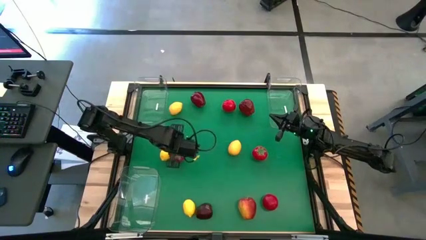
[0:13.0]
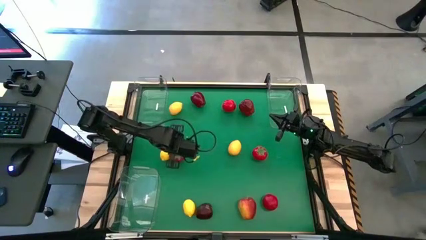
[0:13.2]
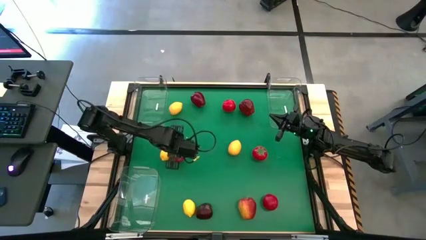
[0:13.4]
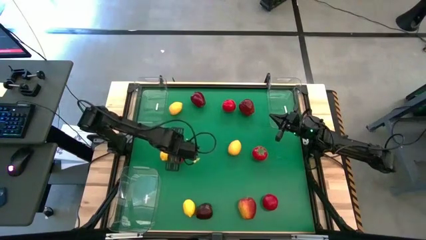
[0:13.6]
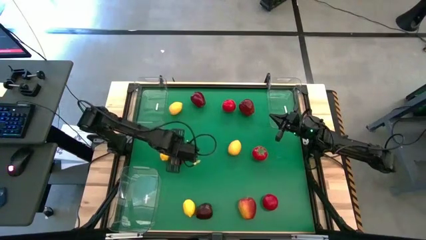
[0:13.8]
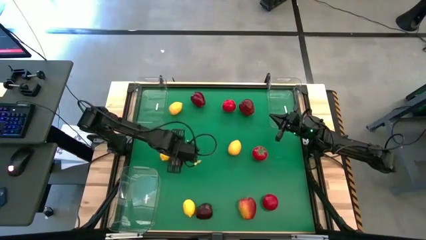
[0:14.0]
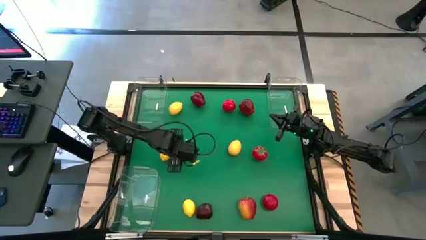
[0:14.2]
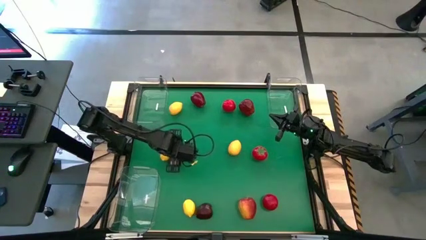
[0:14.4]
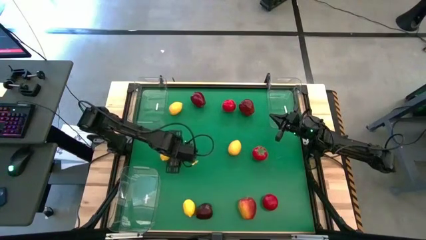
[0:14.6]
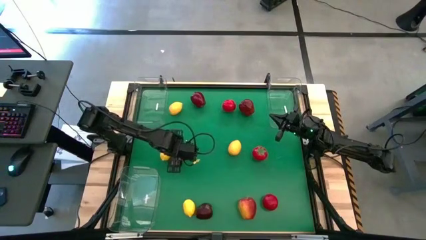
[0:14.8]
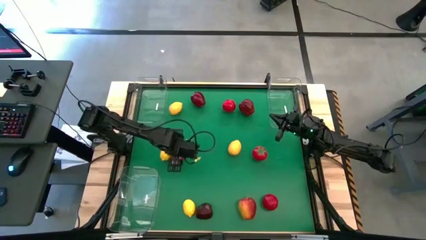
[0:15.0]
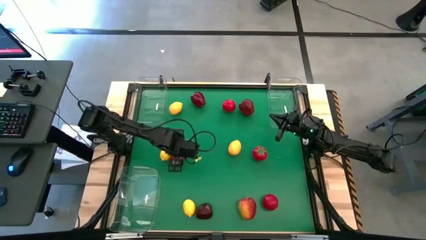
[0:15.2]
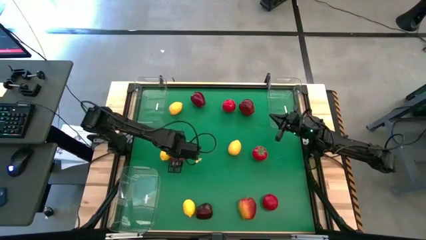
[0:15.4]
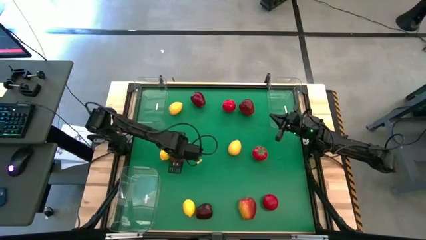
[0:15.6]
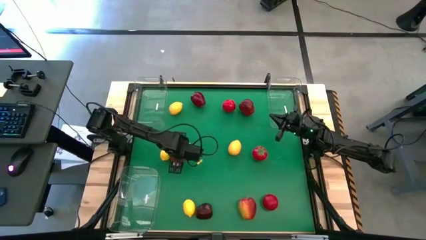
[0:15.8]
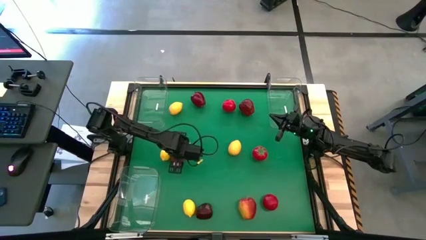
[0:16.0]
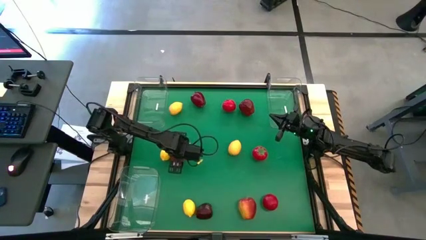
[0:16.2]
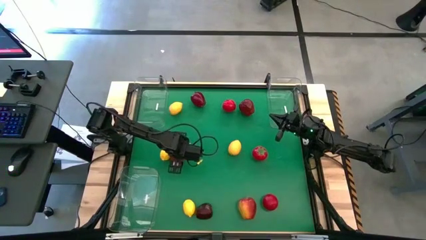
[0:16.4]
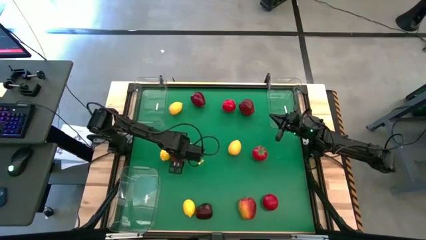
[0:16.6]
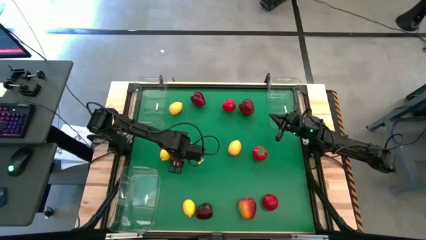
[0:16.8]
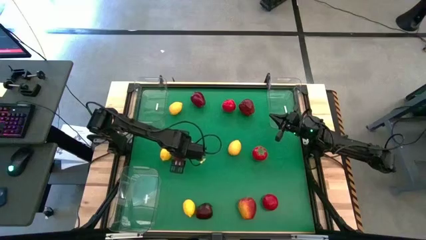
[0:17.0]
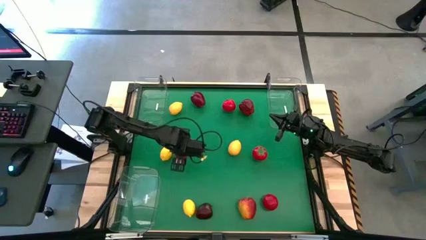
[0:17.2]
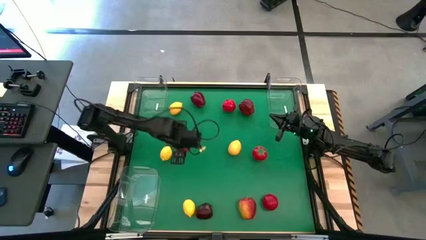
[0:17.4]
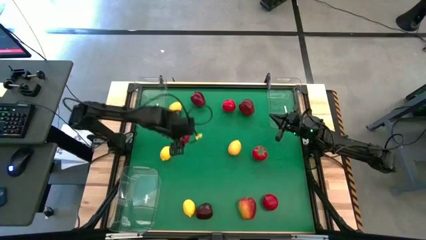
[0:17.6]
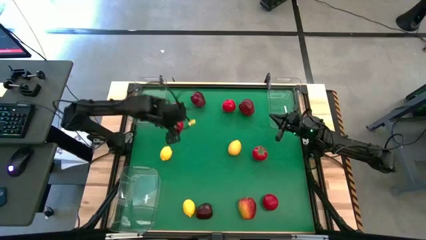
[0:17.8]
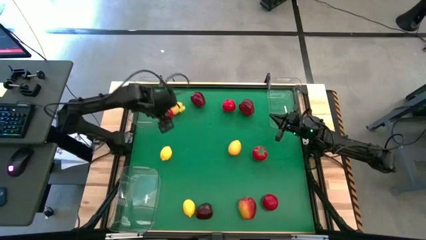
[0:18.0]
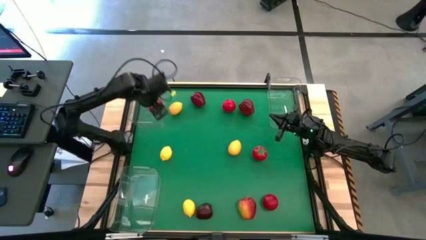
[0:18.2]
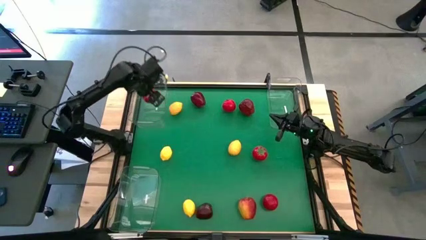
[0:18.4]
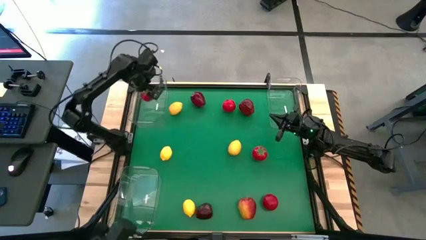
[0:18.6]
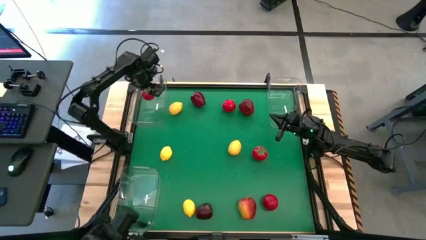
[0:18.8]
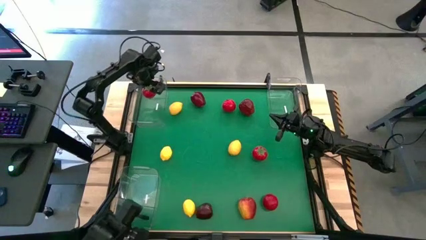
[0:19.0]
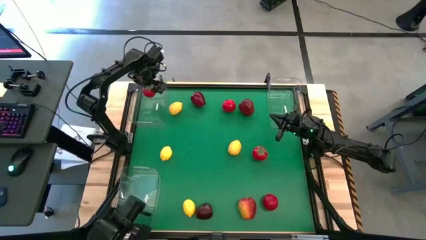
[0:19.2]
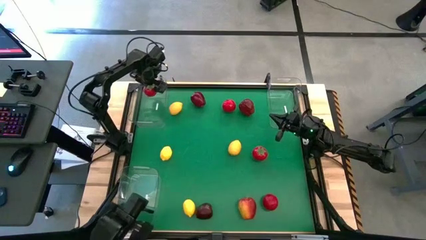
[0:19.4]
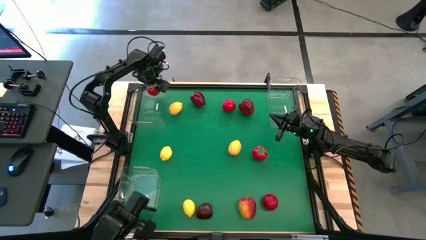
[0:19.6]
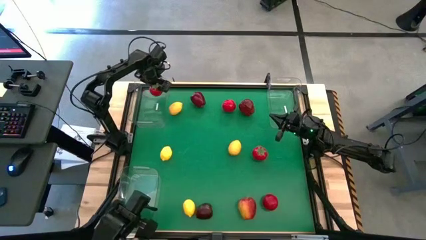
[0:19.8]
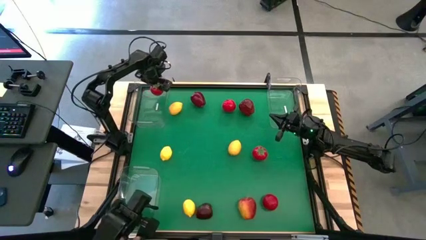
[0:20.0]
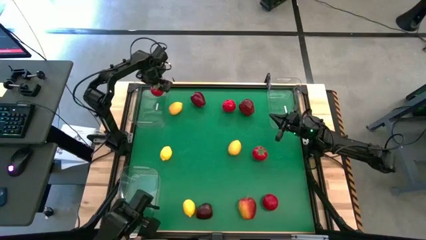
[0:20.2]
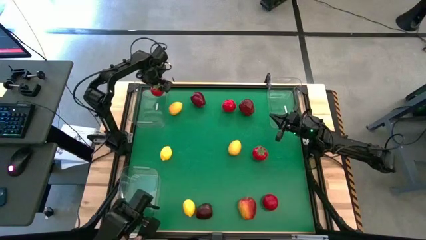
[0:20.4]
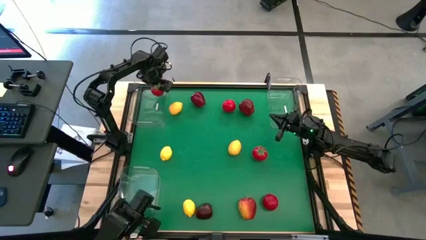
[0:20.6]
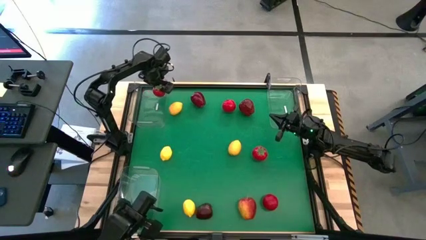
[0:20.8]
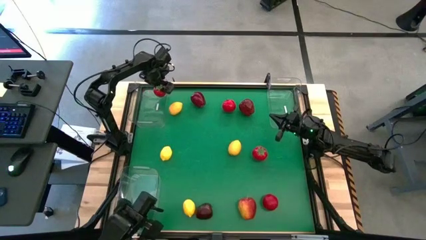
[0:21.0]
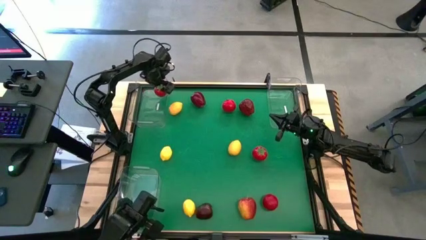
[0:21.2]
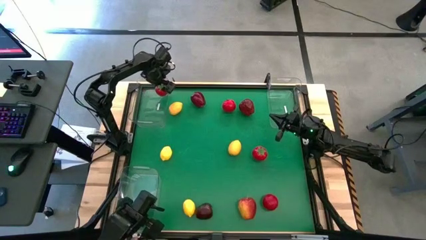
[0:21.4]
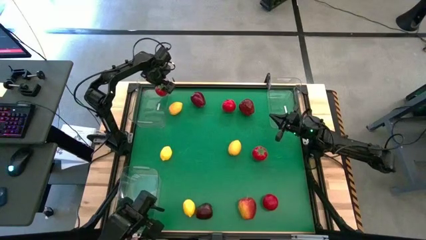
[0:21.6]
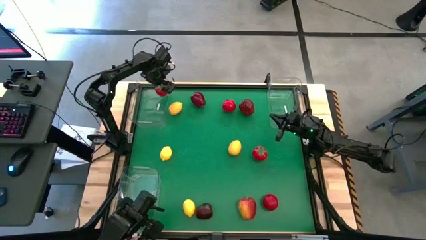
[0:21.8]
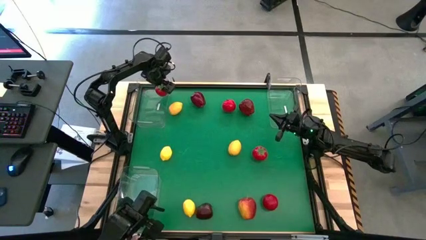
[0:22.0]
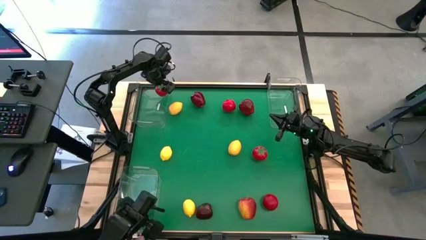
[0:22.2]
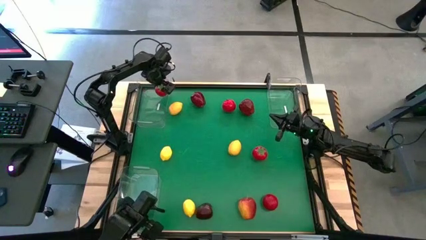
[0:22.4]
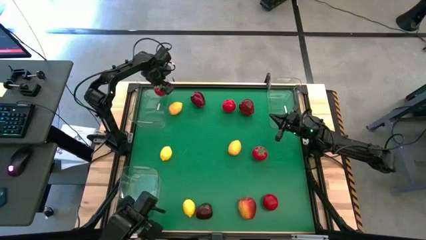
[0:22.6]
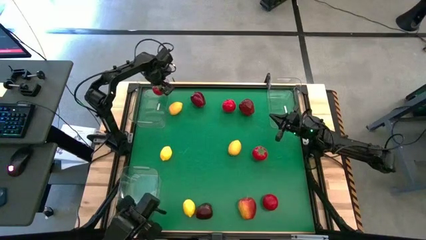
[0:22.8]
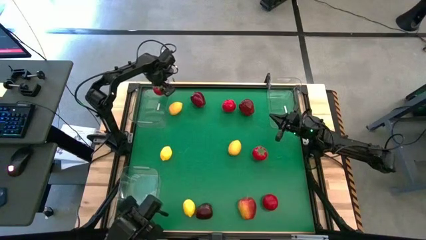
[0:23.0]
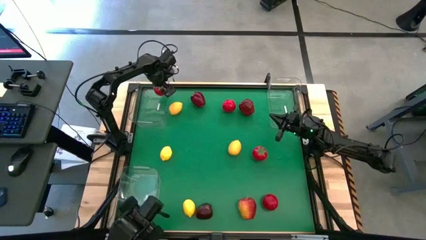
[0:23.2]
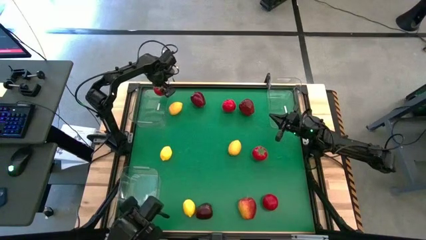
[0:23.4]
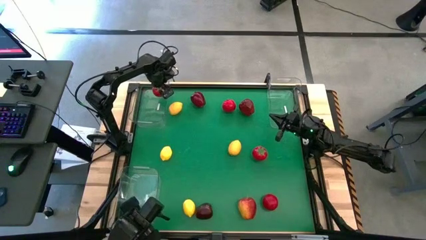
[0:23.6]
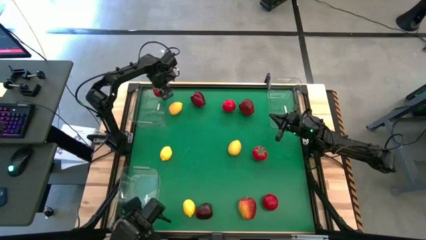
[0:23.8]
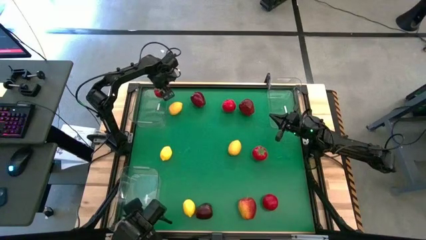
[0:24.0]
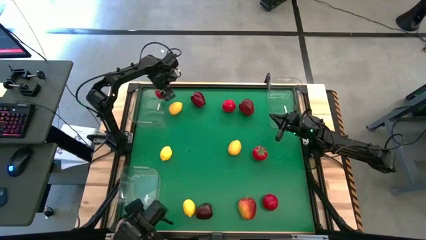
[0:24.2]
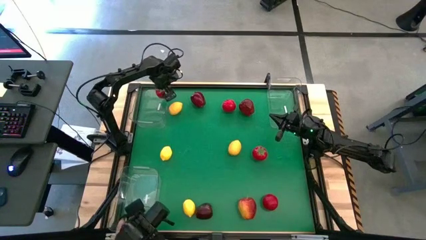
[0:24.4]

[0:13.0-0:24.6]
Task: Sort produce into baskets
Put the tomato into the top left bin

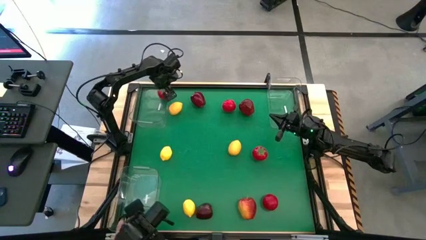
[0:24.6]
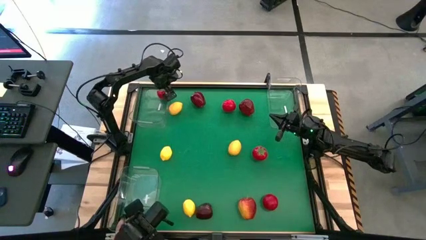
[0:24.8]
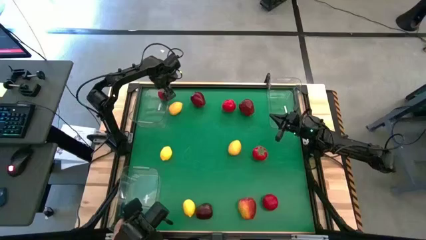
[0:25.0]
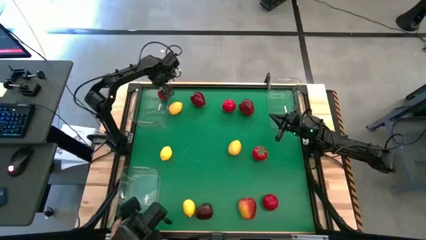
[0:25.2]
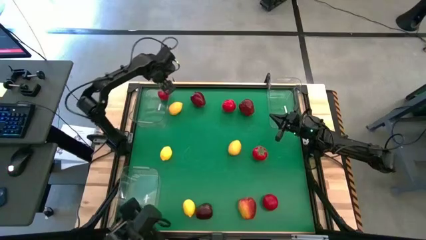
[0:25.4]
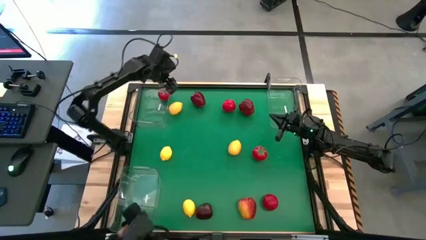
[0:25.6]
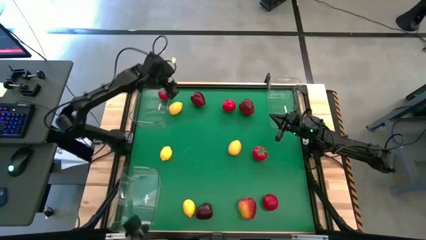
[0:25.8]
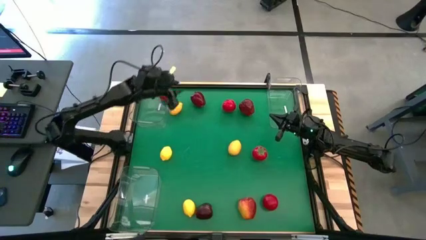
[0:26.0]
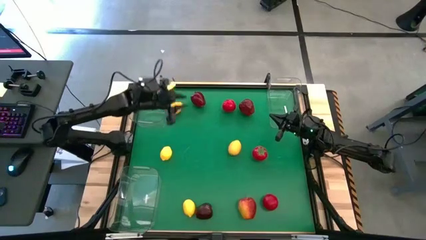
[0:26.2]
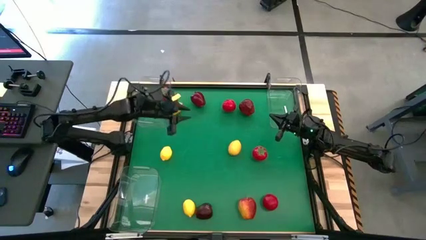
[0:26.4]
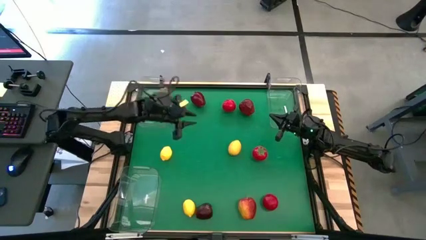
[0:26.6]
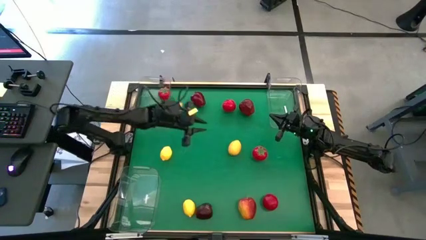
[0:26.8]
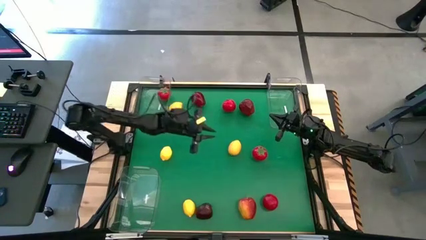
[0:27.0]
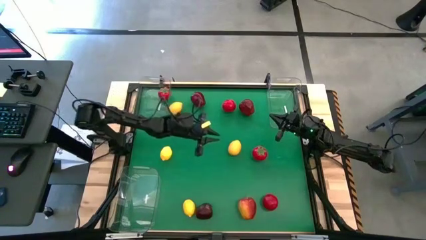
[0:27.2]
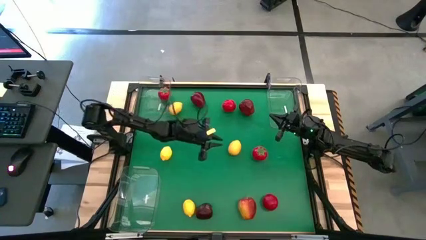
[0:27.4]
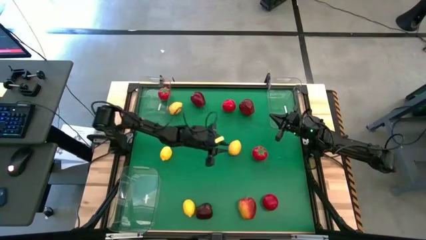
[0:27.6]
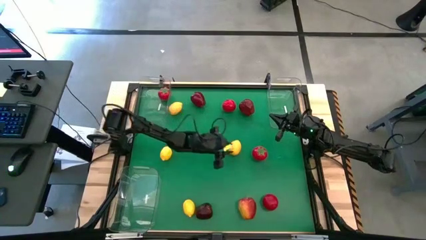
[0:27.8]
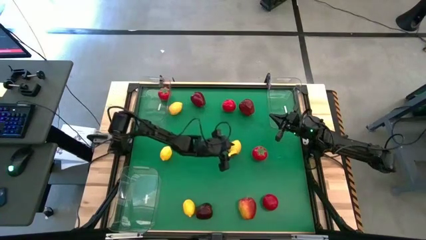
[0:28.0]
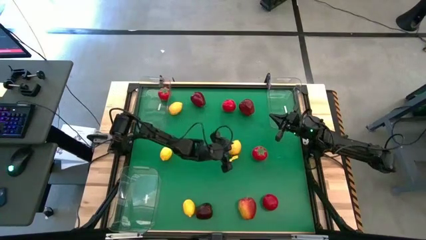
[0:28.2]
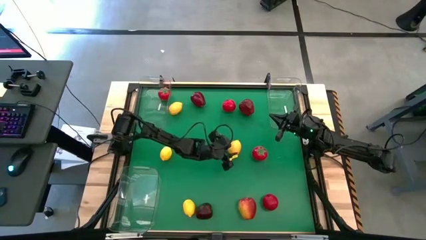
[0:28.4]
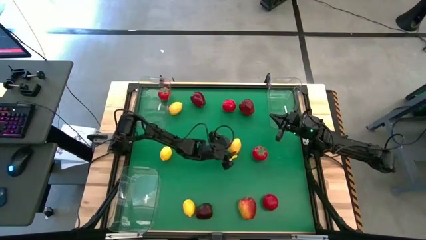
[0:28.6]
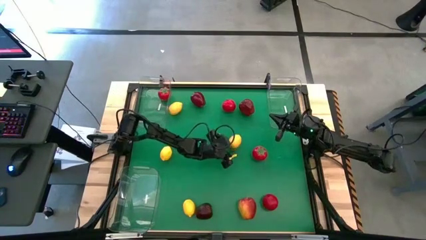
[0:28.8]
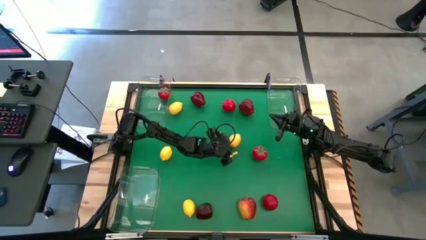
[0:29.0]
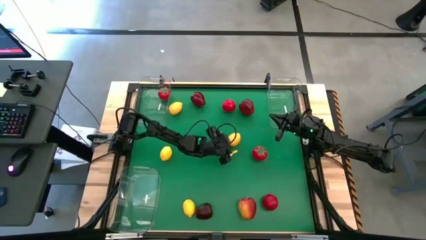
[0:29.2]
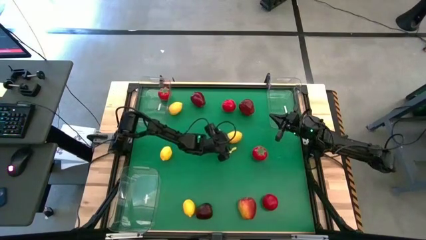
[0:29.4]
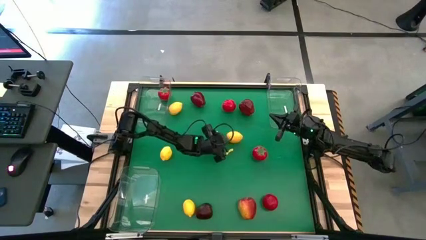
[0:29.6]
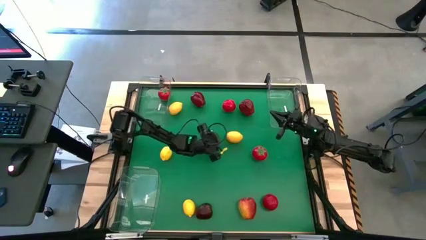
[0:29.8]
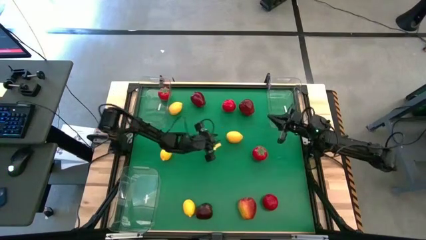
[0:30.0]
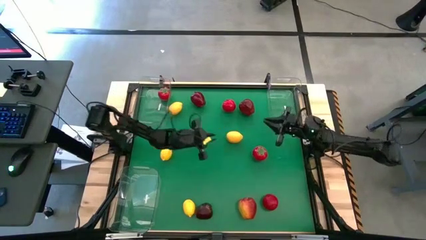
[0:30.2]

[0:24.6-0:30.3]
Put the lemon into the bottom bin
